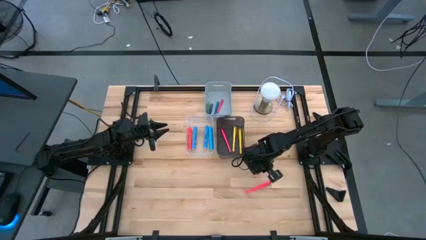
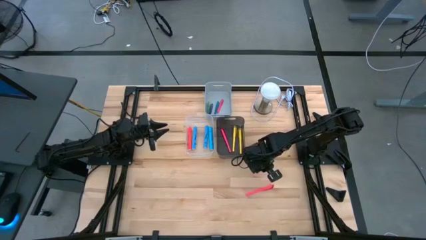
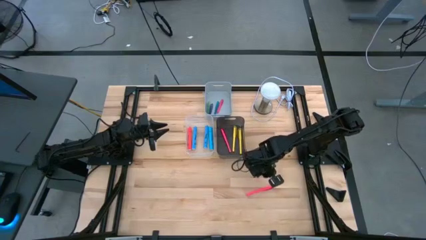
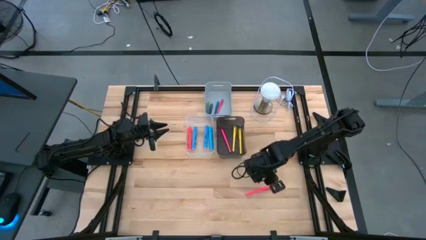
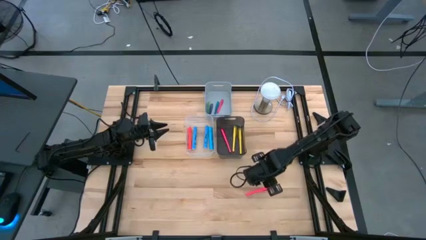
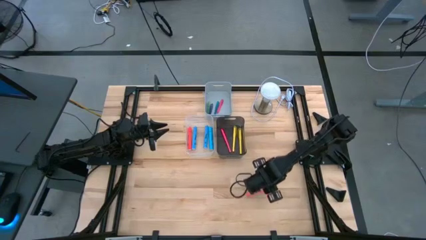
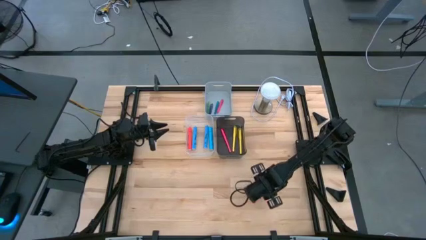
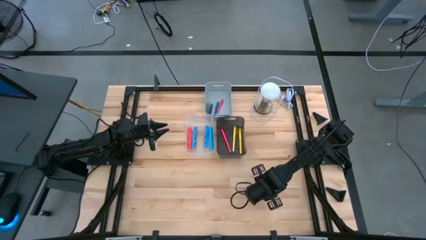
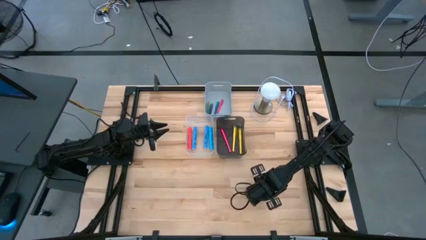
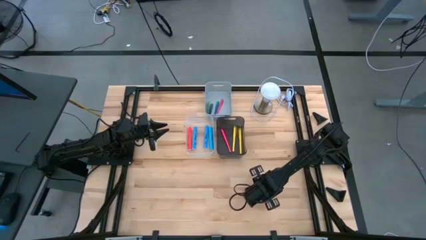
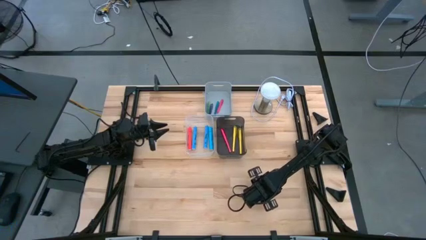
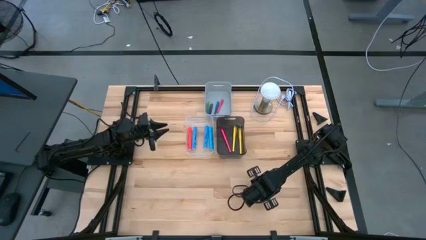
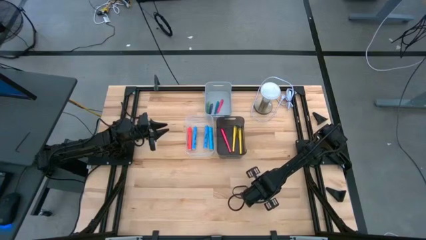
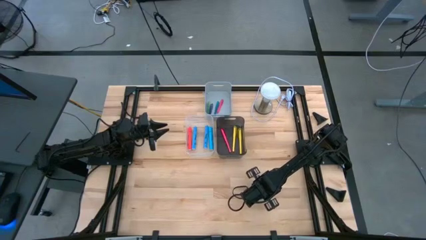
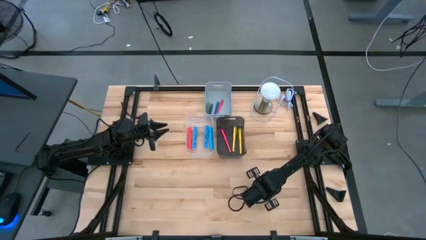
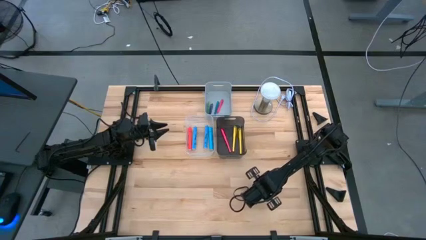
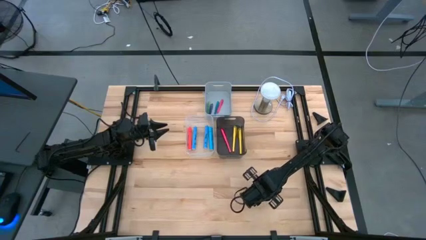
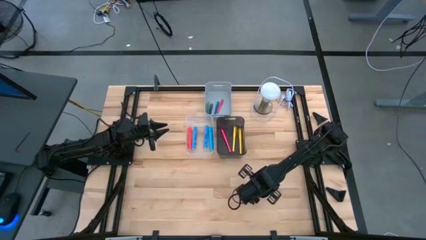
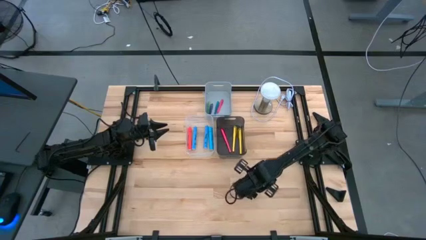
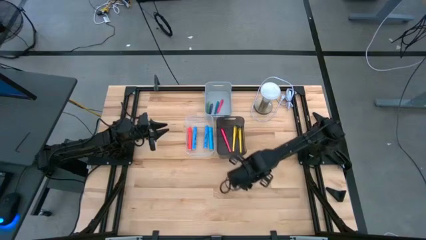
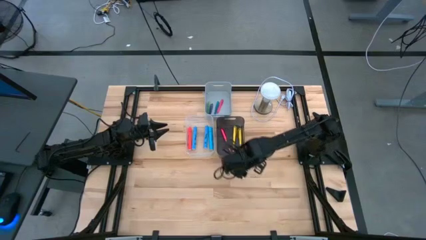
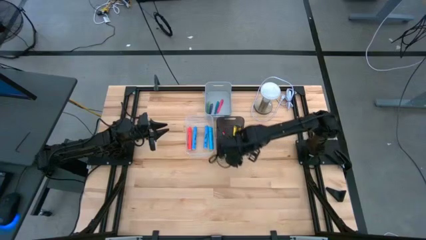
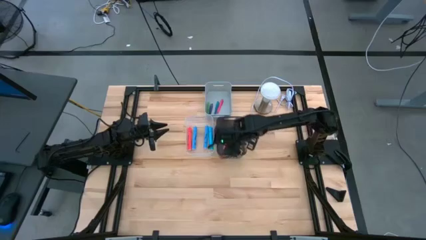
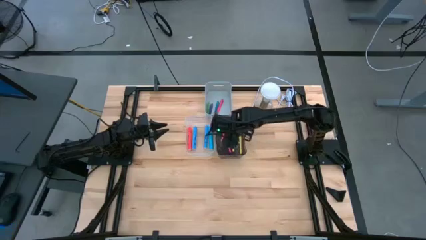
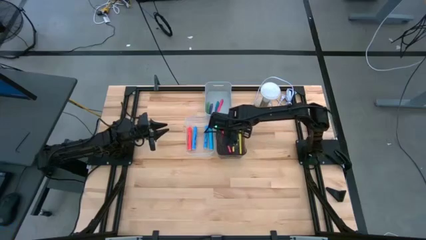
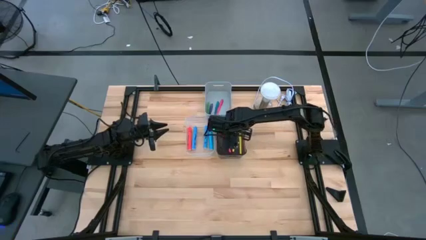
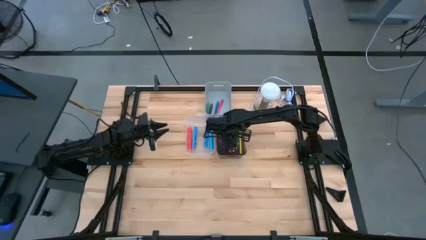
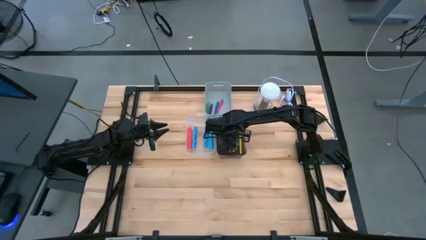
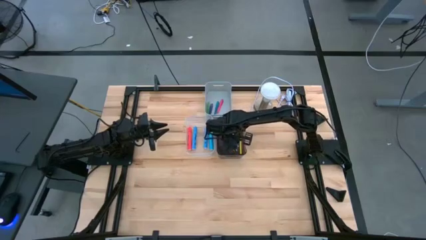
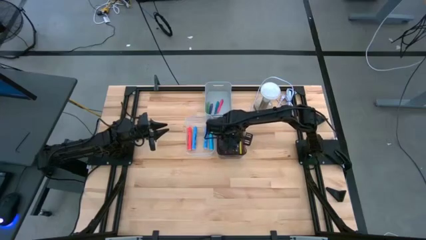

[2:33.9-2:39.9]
Task: Pick & Place Markers
Put the pink marker pen into the black bin

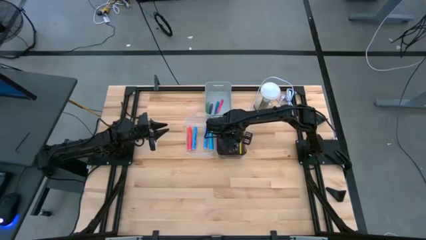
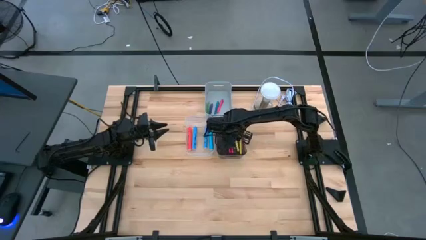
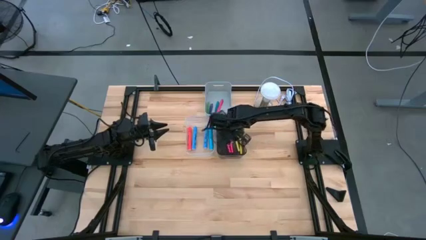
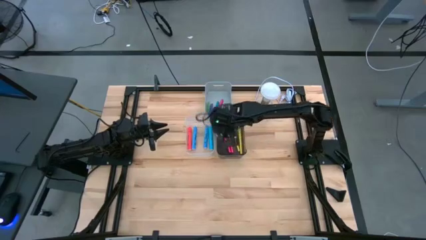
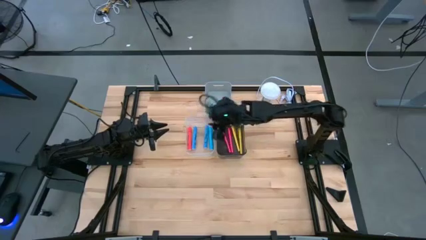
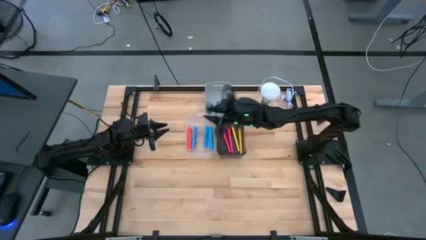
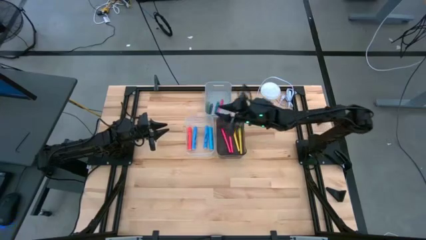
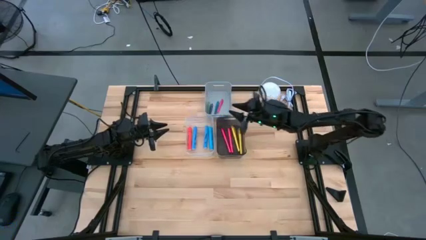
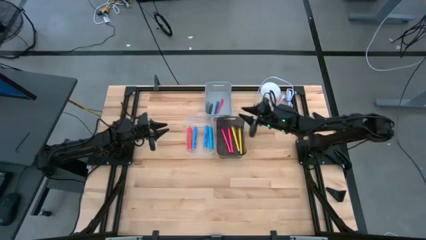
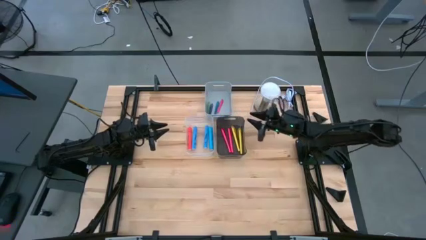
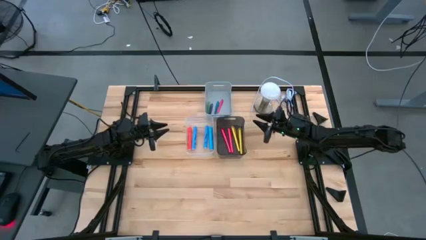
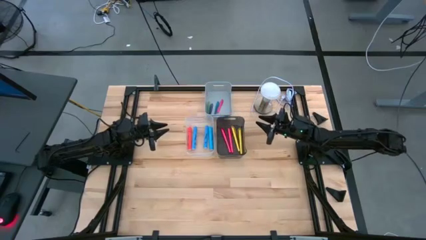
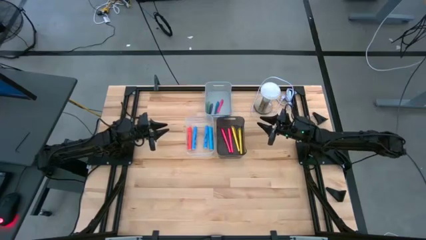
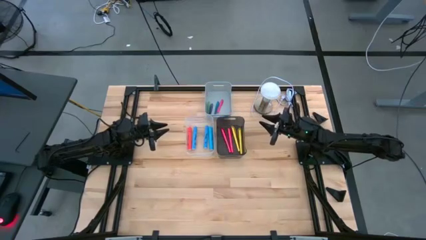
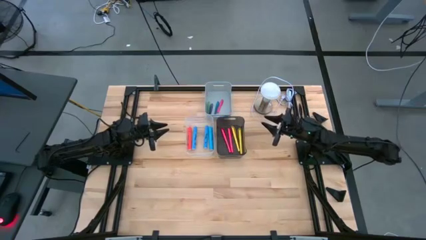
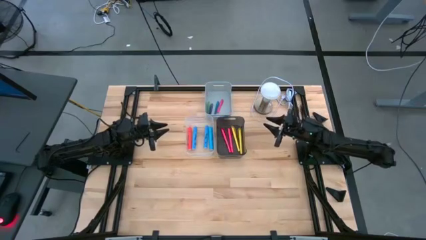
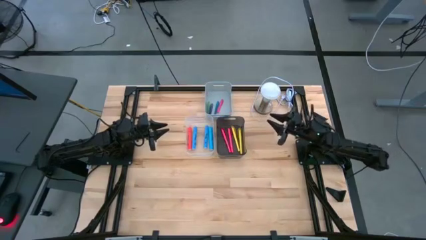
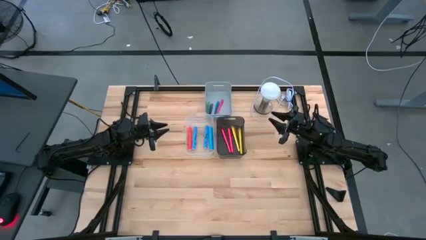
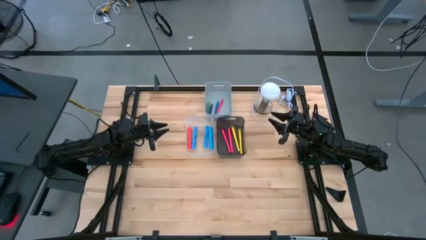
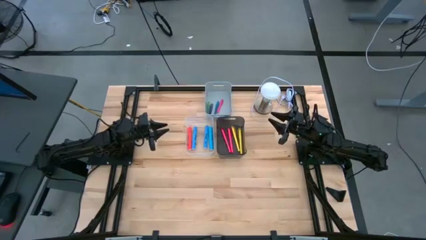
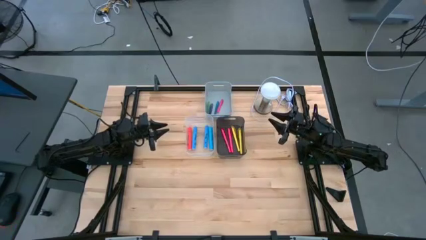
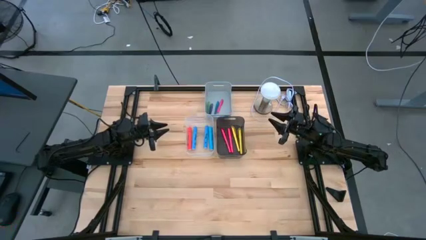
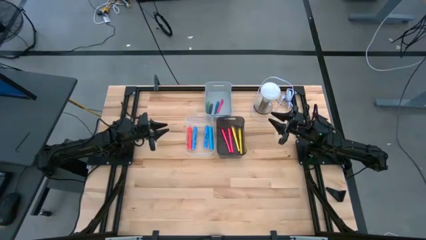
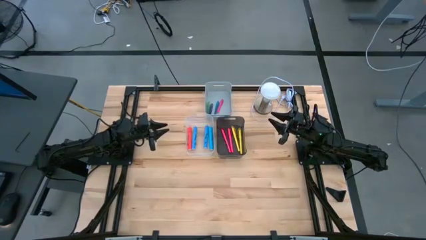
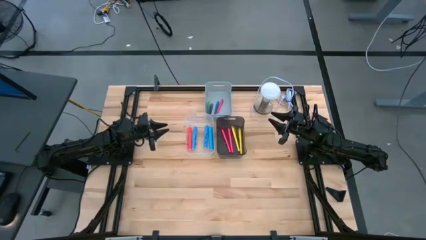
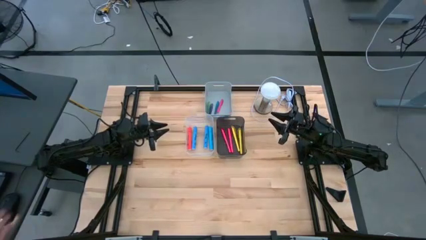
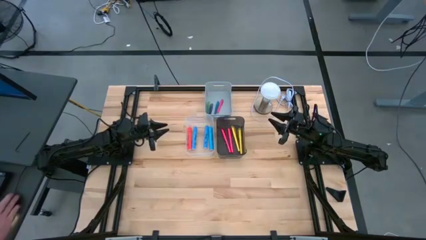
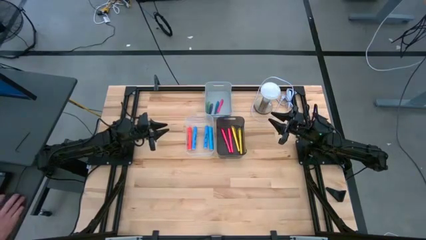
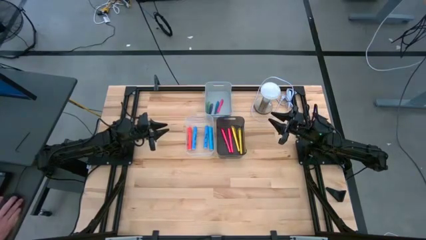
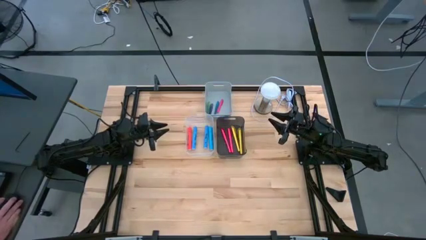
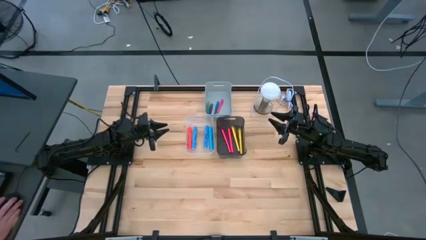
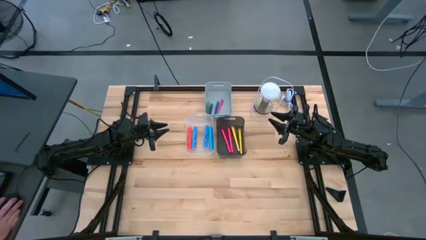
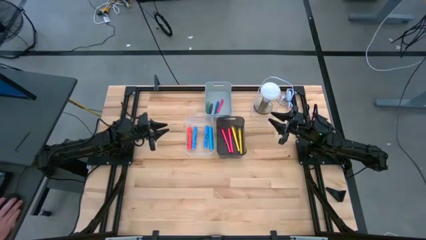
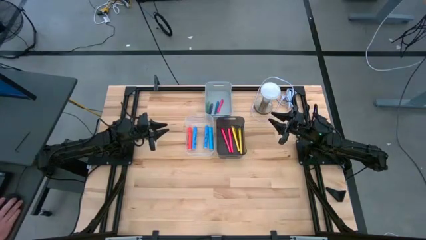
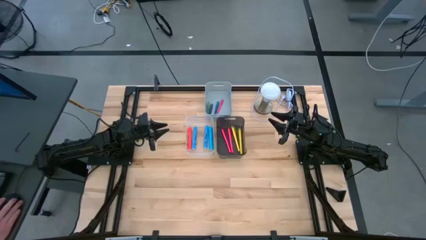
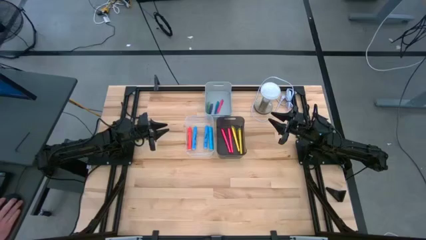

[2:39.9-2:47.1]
Return to Home Position
